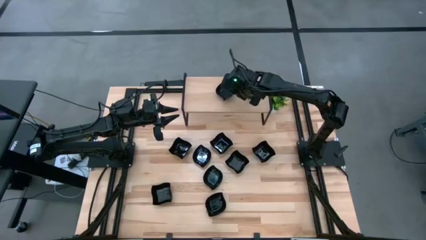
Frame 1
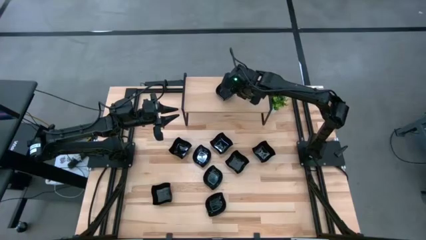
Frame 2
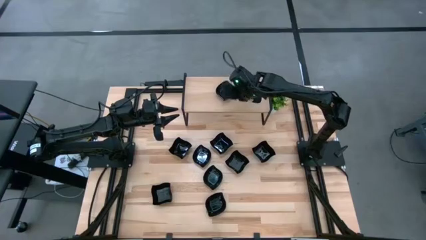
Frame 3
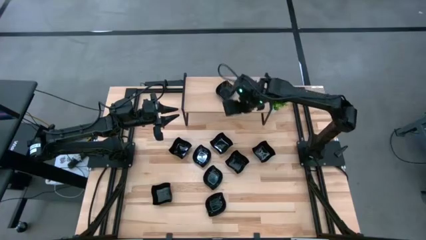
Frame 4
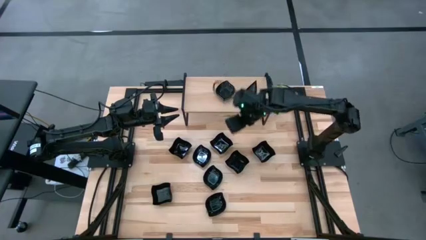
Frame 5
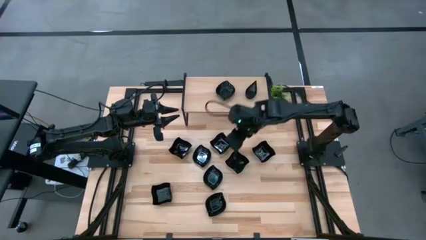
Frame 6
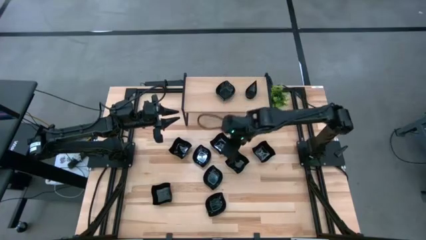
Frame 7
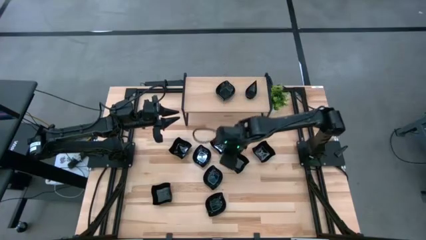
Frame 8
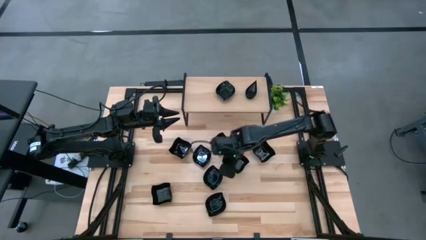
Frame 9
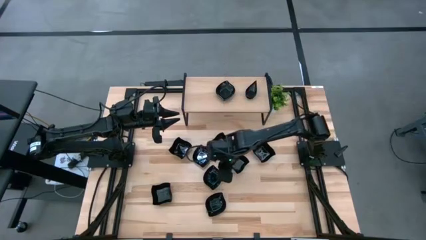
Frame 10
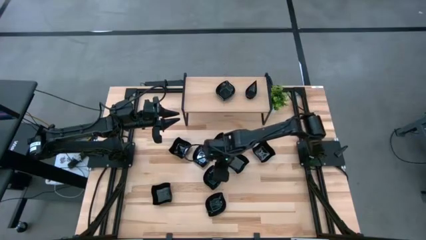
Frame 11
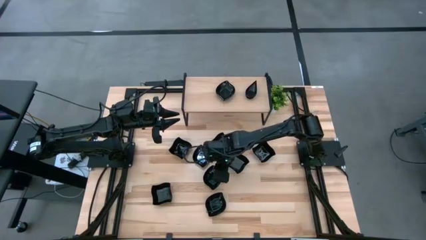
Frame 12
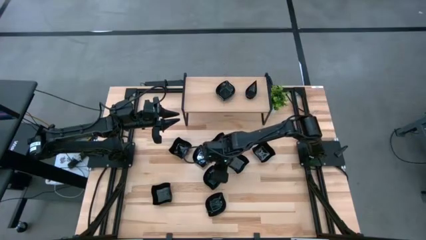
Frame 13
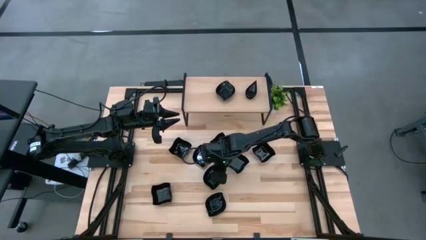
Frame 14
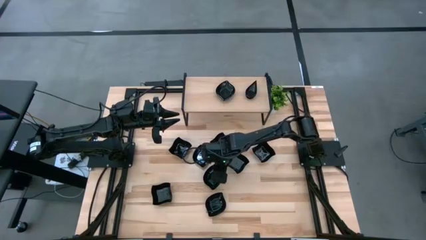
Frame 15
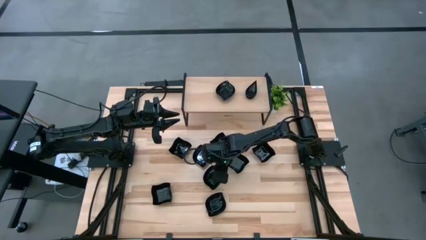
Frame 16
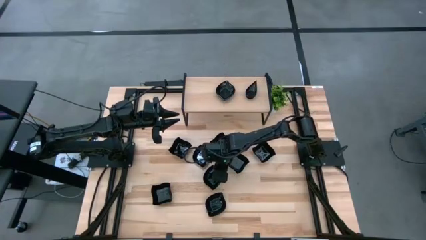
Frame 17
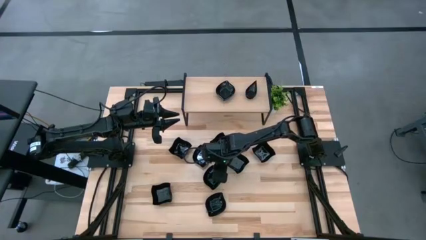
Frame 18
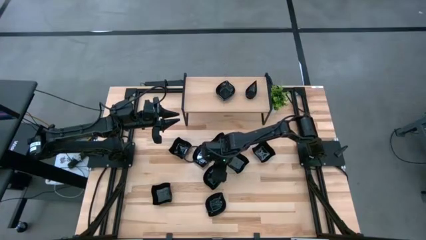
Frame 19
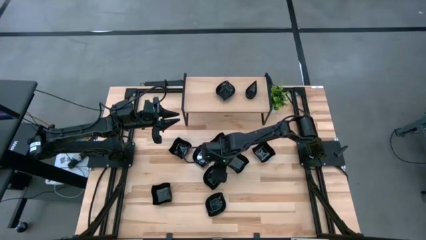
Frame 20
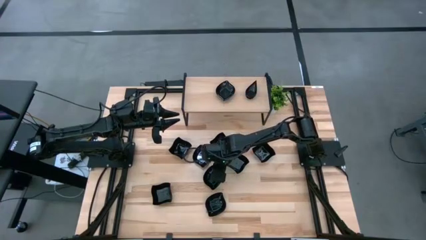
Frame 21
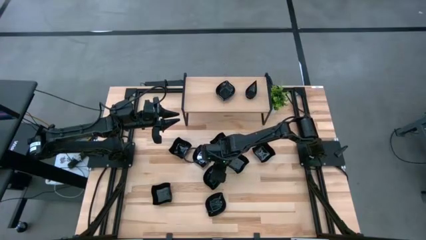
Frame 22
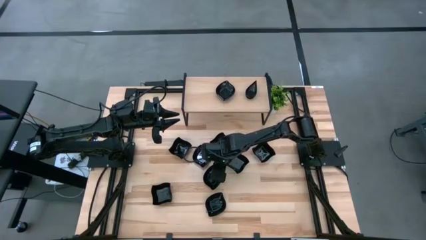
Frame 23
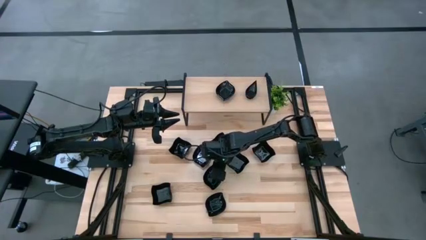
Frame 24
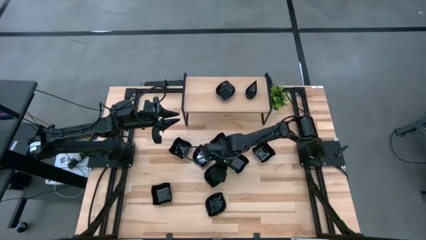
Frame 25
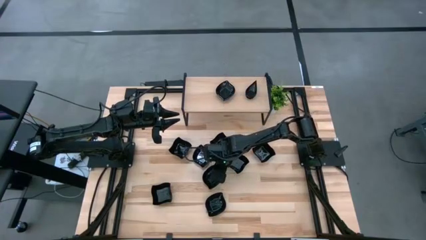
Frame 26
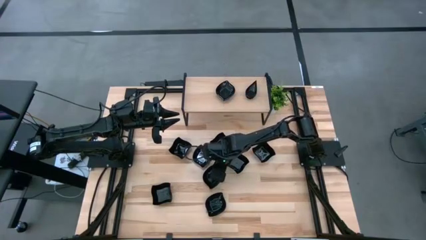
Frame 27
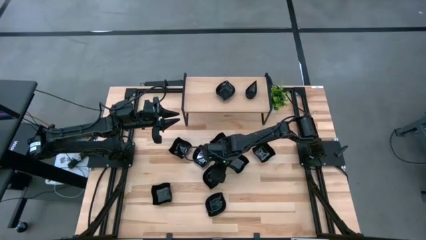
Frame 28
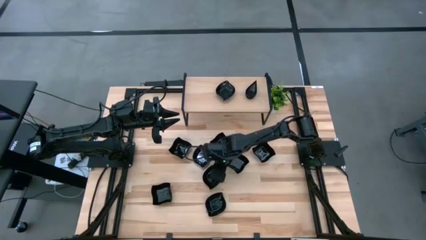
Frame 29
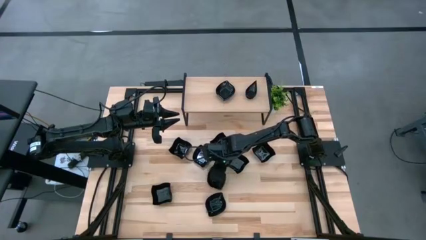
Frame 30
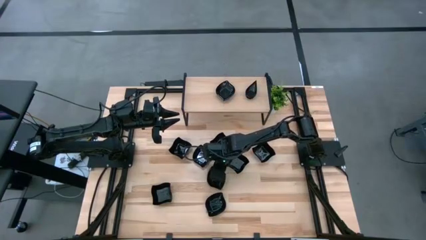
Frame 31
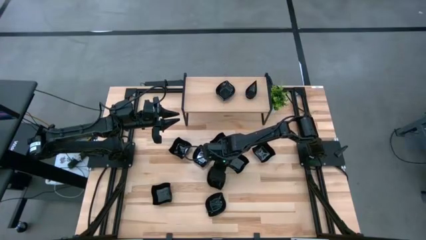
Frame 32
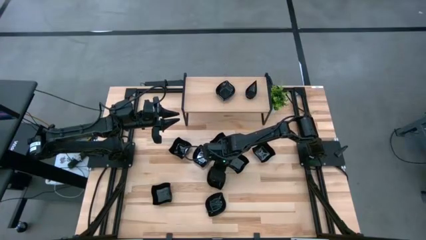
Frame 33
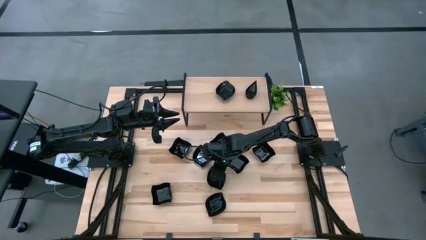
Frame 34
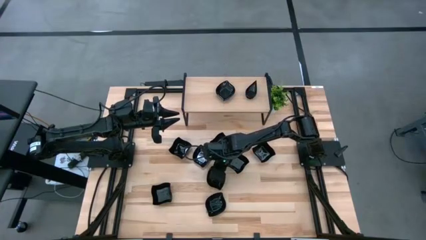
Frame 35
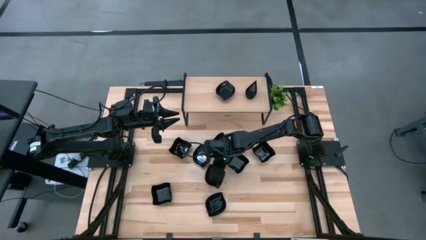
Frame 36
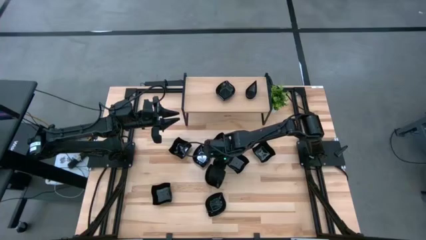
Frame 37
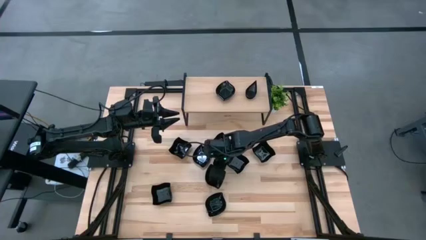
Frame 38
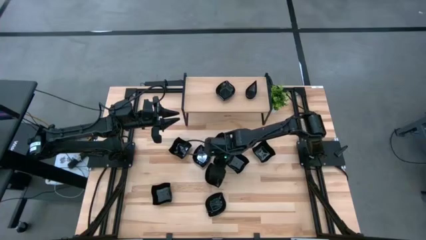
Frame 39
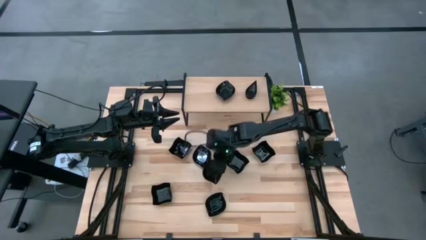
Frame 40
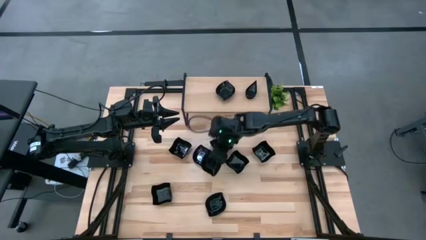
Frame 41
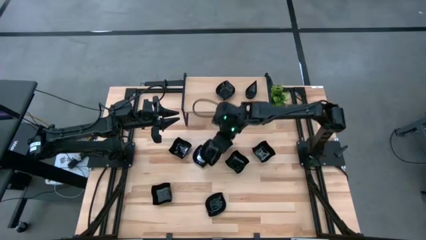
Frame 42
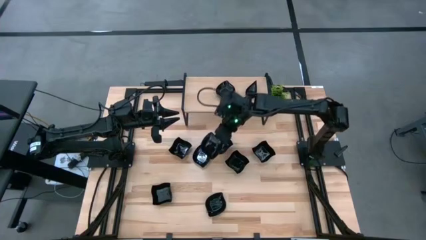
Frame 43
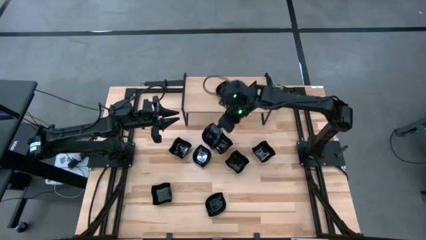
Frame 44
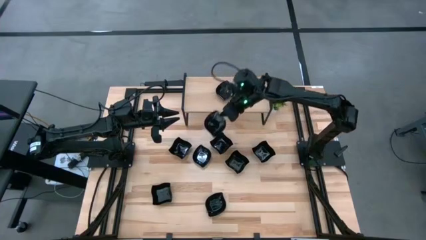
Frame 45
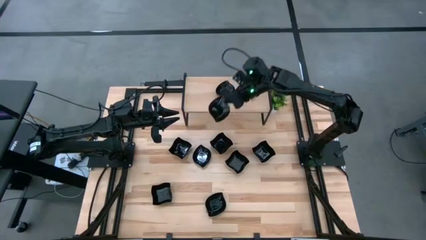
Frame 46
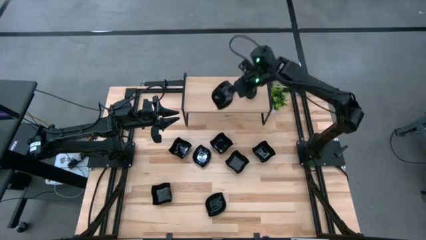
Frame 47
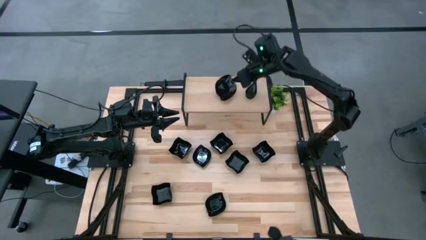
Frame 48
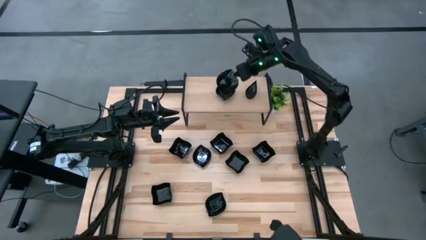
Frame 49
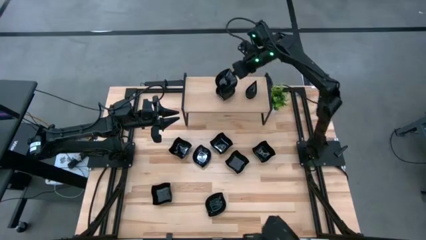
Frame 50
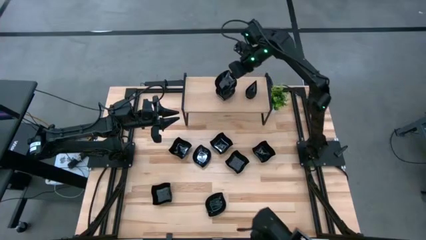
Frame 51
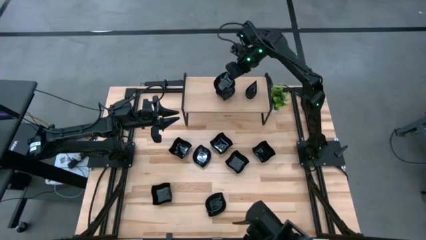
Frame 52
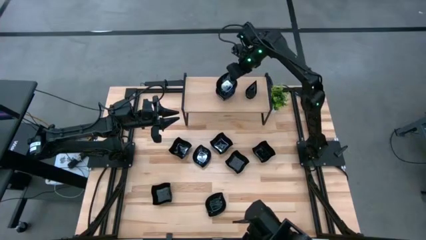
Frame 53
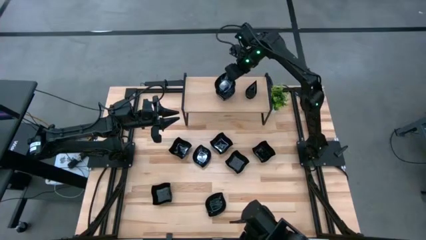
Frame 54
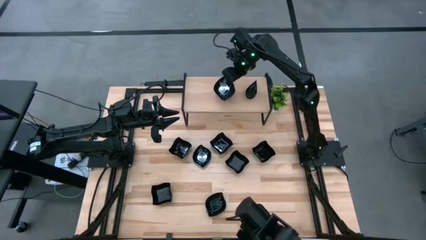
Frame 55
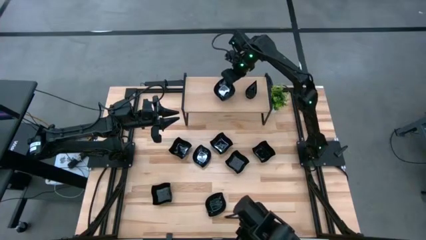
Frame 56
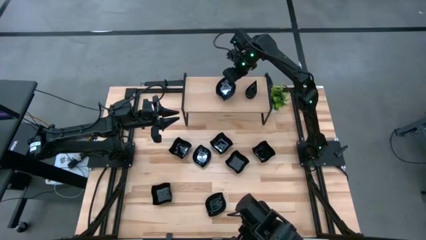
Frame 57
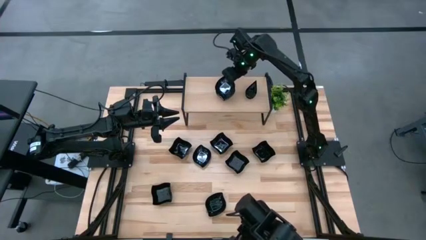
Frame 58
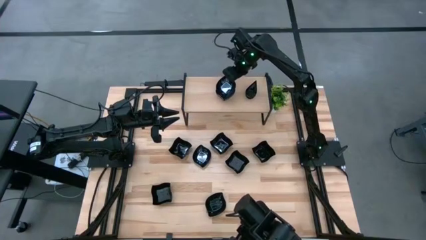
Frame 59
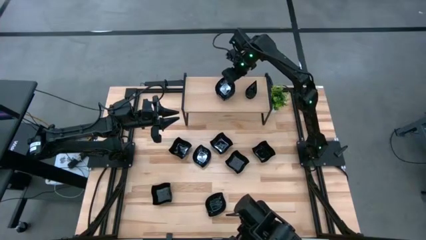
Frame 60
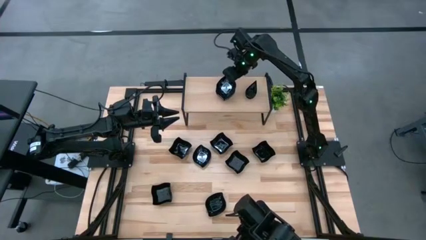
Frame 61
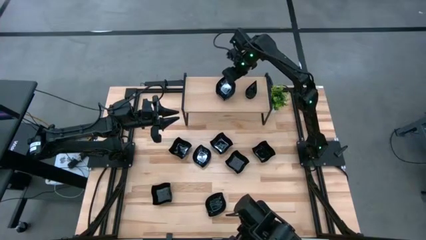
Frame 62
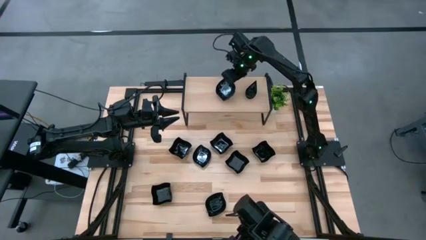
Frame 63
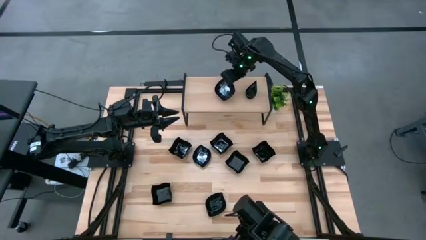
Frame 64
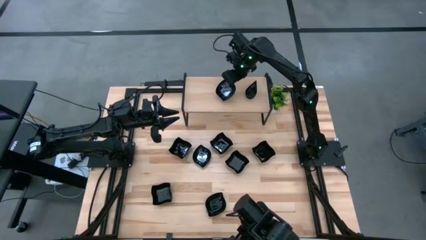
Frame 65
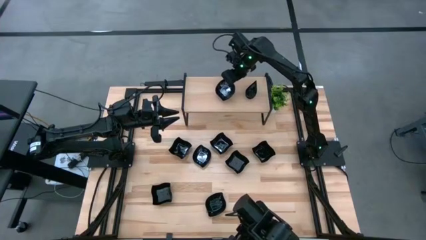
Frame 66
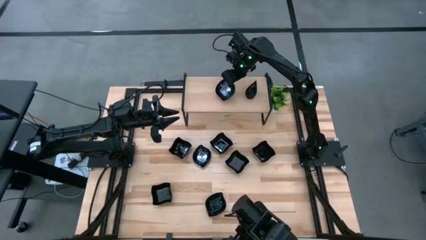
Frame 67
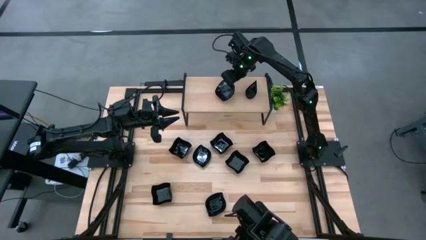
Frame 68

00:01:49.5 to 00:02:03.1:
Task: Pick & Place Mini shaped plates
Stack the middle black leaf shaped plate on top of the other black leaf shaped plates on the shelf

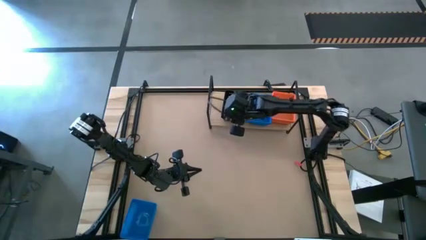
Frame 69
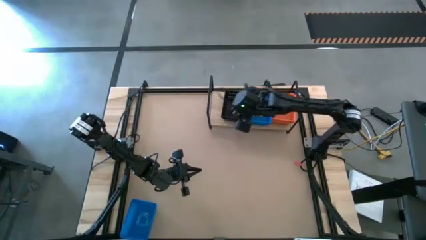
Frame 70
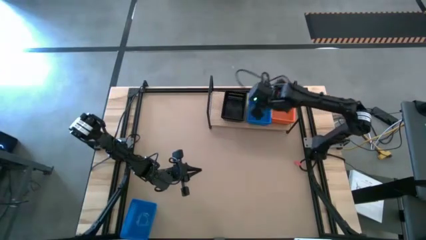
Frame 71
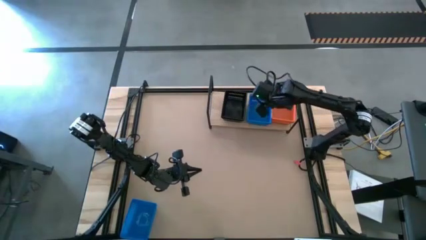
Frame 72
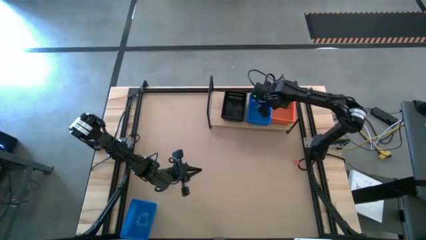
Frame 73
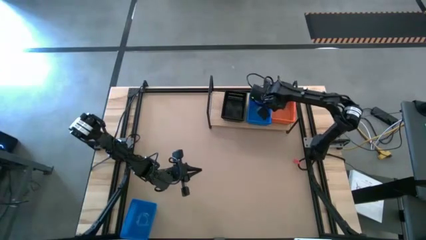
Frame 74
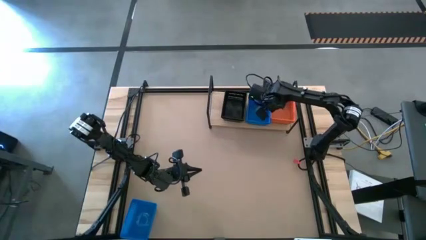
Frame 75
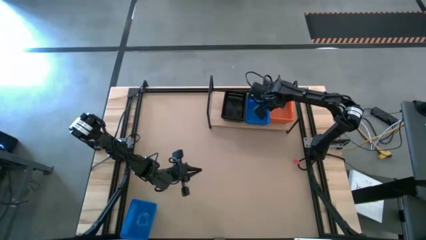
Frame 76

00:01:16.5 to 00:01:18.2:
Task: Stack baskets on shelf by color
Adjust the orange baskets on the shelf
